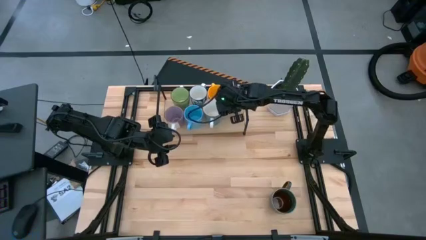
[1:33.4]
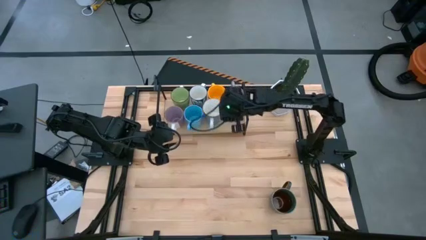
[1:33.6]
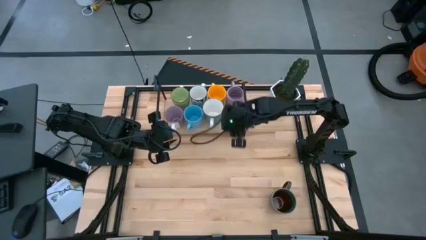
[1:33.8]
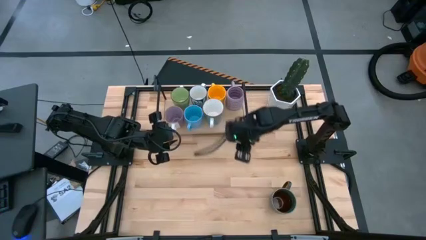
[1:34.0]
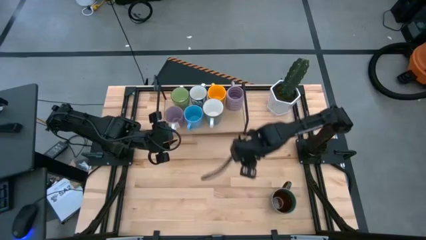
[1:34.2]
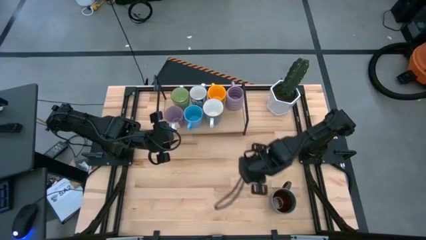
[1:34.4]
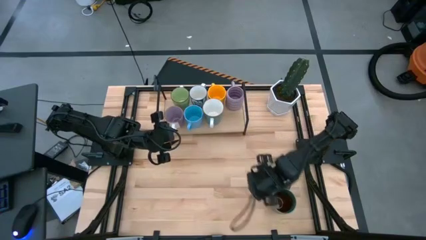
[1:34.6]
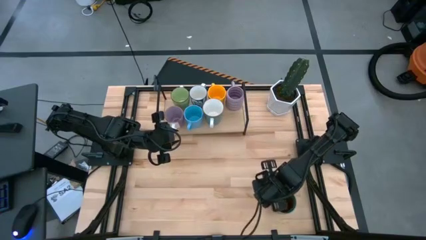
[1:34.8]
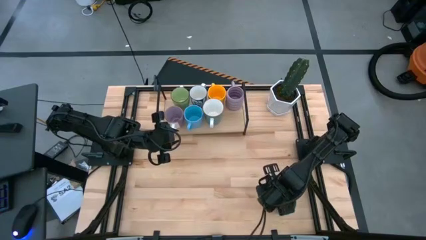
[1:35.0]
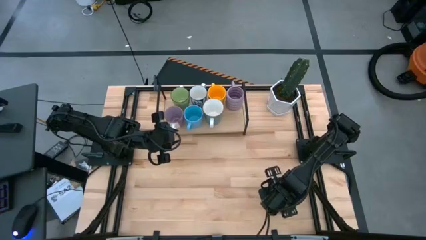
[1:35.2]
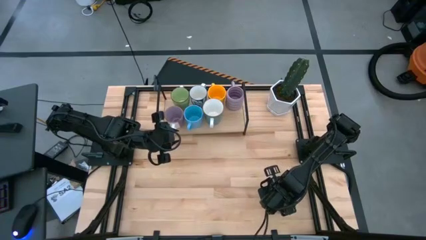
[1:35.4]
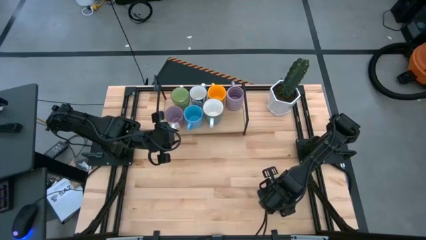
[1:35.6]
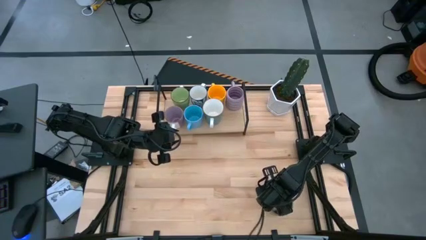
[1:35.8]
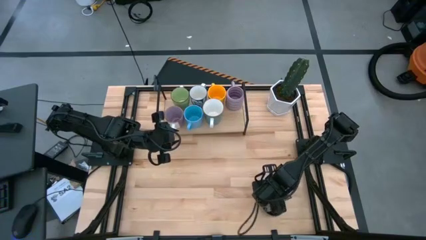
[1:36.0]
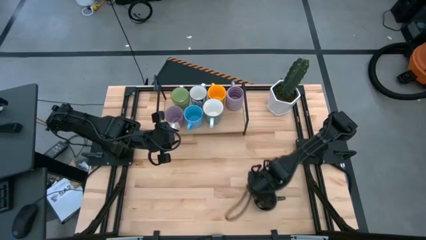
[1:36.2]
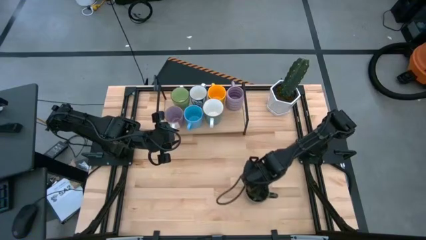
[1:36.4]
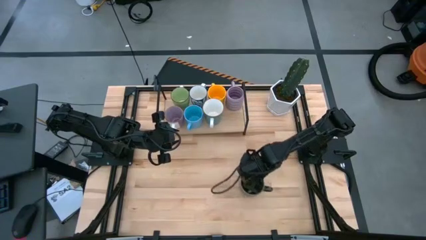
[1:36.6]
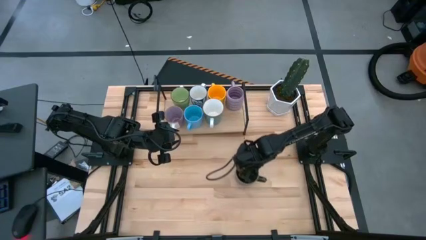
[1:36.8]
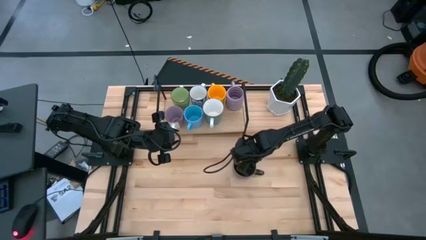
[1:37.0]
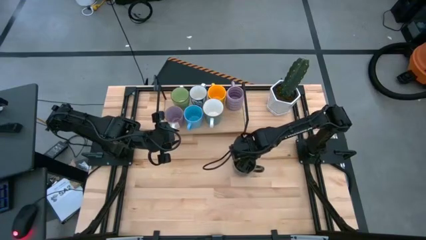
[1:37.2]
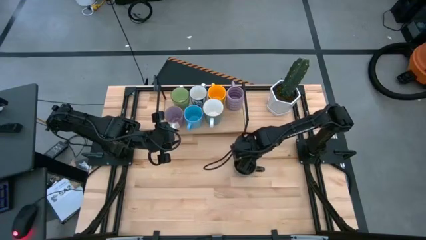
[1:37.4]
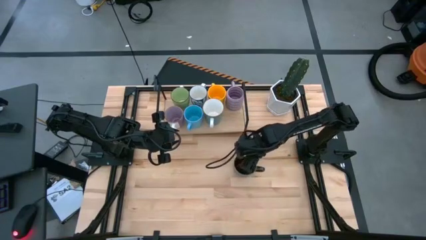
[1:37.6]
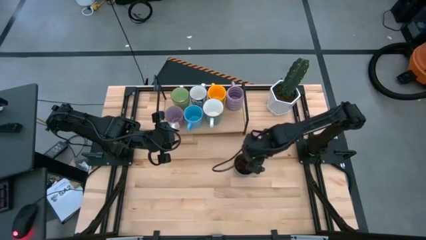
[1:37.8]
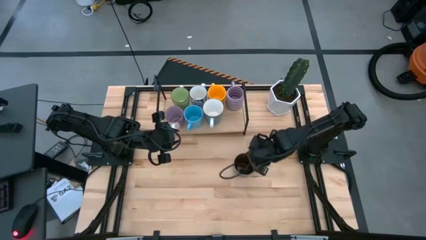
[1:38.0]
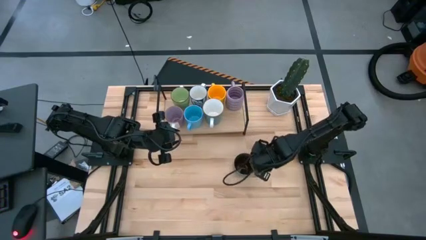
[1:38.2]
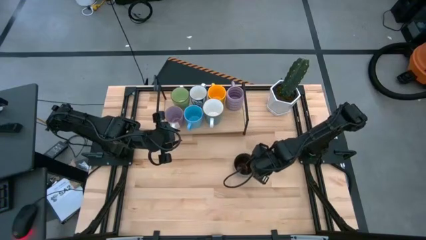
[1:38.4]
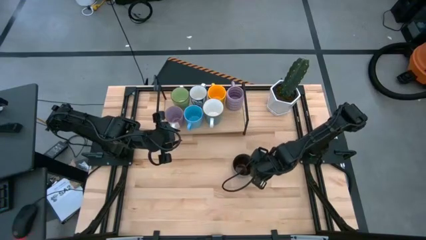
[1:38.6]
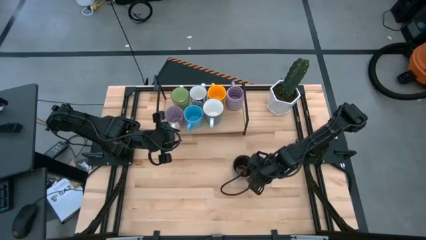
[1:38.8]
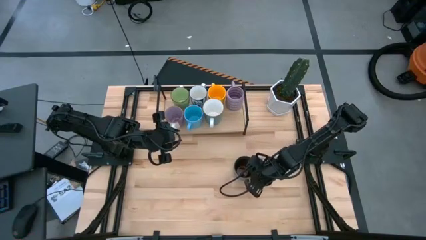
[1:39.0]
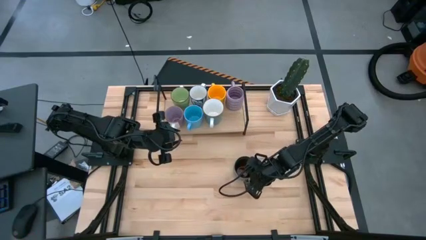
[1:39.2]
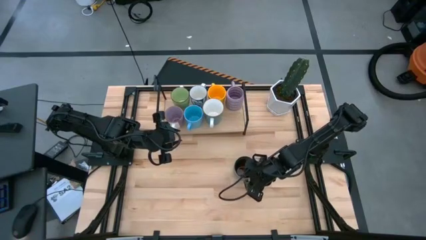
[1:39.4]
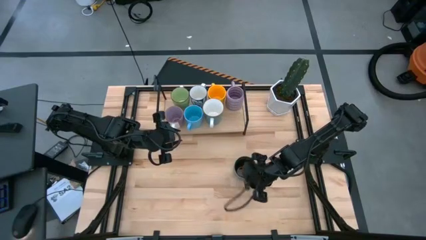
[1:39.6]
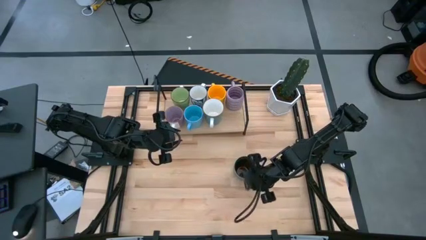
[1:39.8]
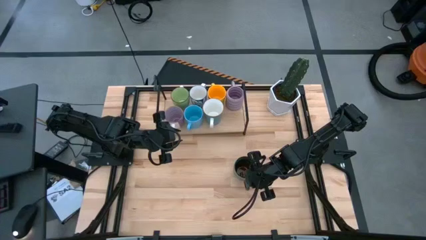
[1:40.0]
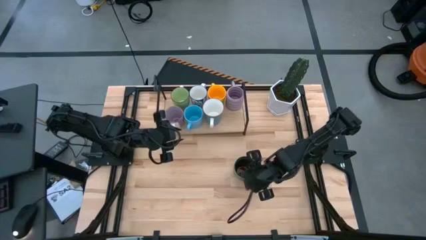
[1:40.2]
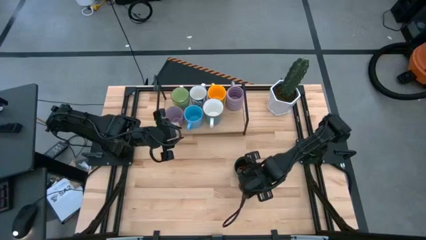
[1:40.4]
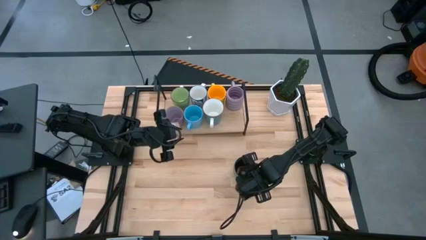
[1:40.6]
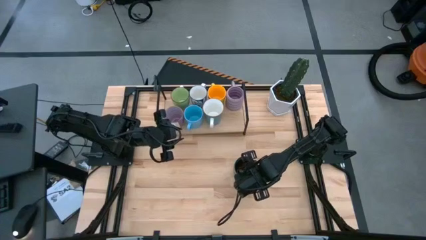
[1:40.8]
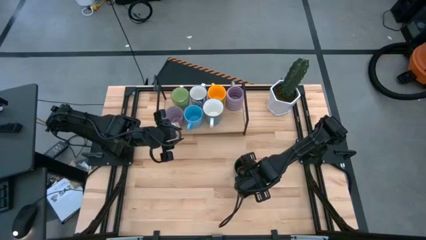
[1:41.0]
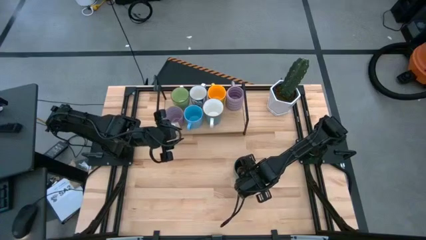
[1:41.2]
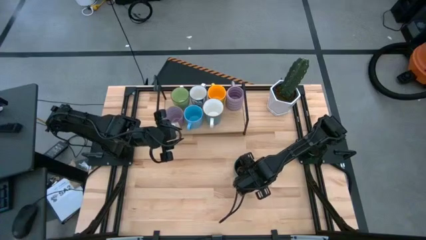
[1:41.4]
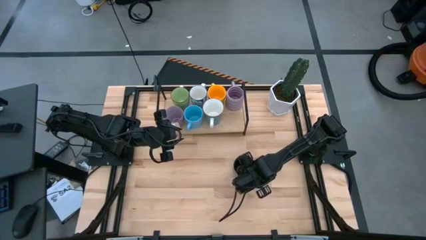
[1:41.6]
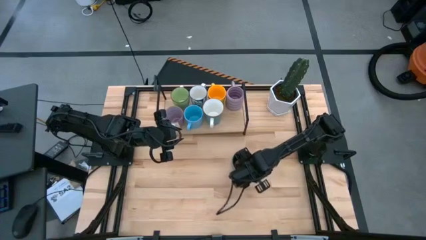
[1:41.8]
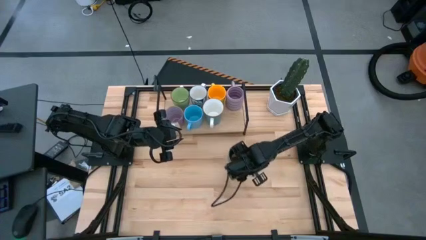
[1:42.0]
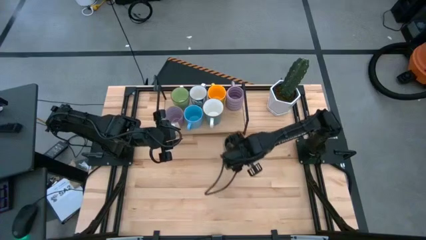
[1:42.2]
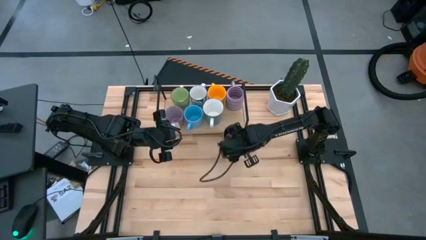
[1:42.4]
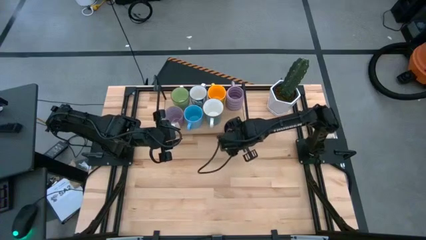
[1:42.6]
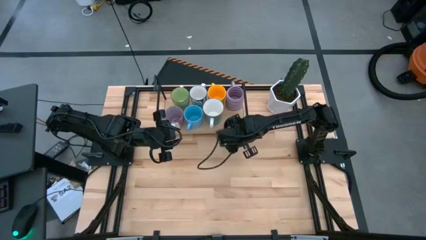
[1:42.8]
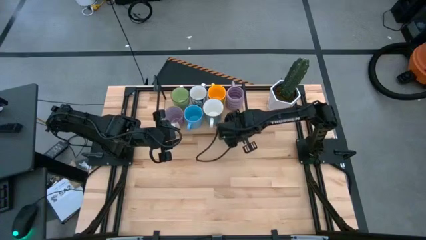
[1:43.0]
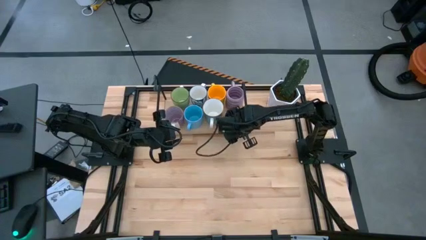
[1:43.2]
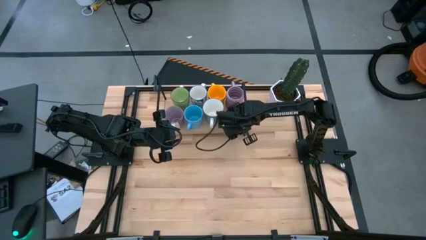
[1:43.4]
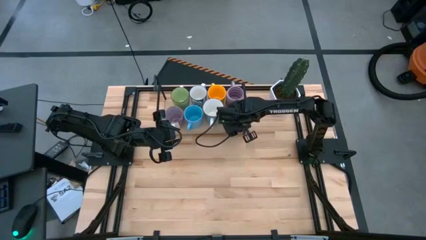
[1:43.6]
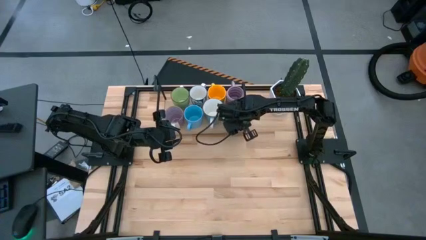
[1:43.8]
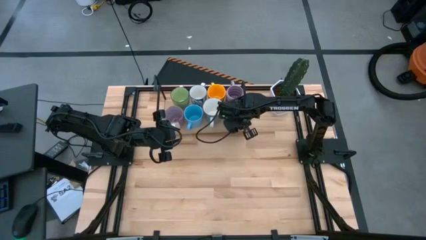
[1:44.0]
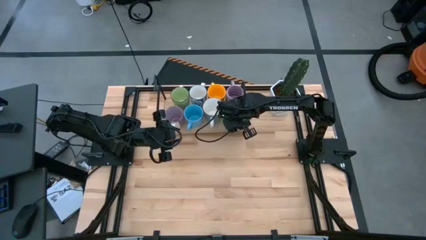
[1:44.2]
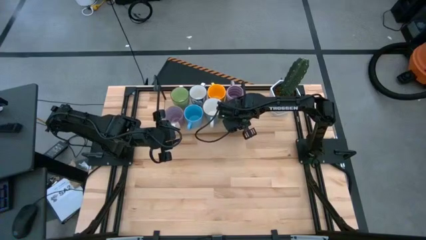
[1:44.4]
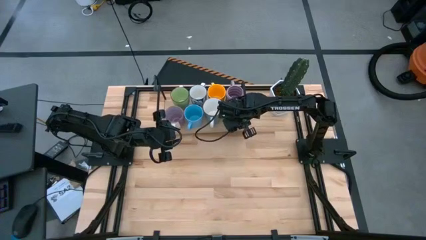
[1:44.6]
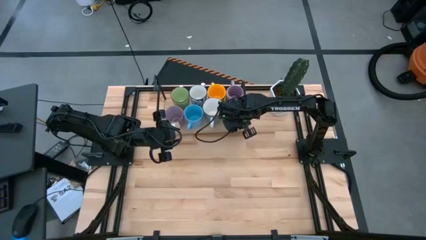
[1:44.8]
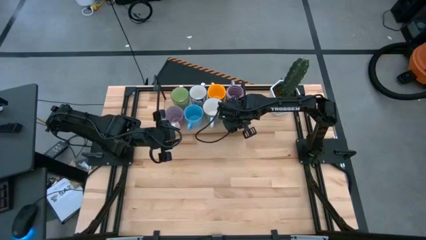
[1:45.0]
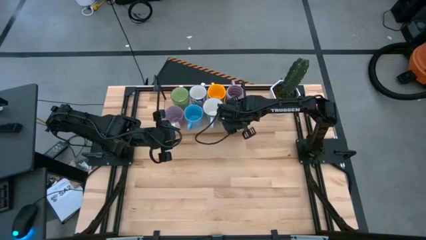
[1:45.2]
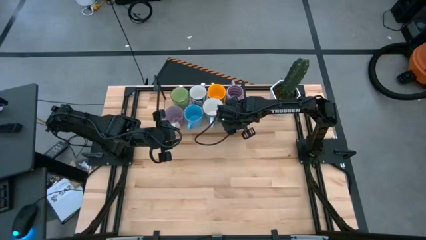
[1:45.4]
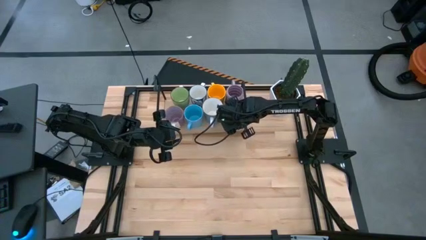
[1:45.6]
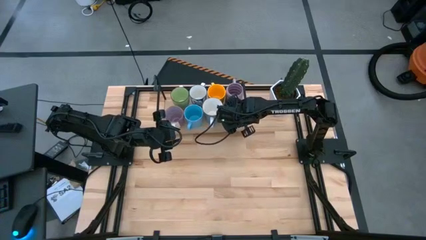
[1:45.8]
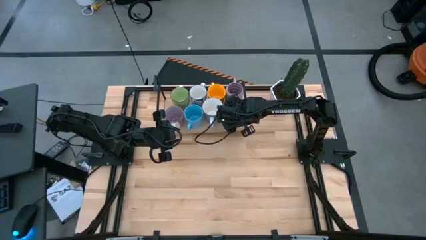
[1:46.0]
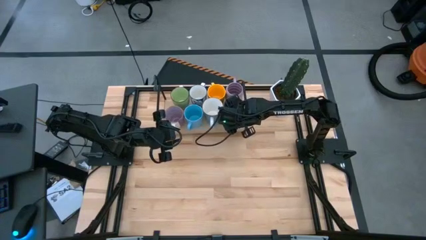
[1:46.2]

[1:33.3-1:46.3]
Task: Place coffee mugs
Put the dark blue mug on the shelf aligned with the purple mug

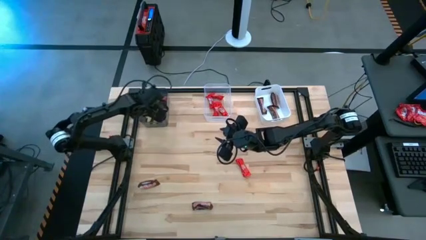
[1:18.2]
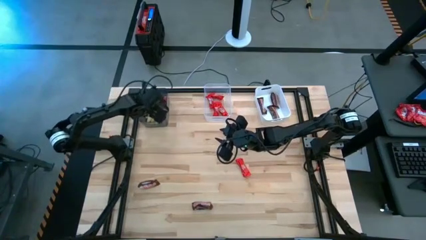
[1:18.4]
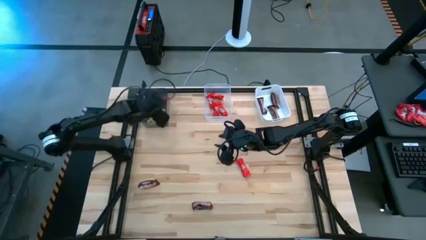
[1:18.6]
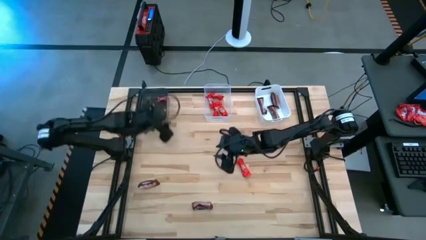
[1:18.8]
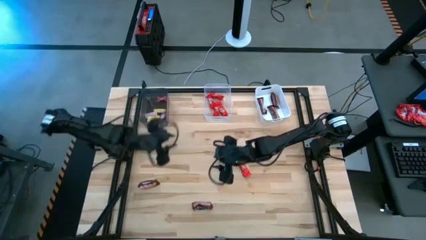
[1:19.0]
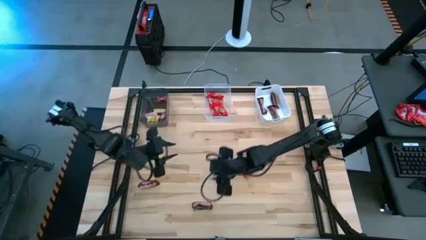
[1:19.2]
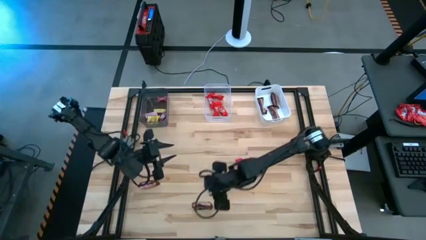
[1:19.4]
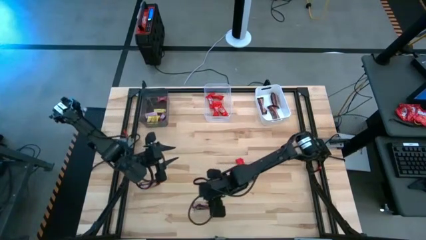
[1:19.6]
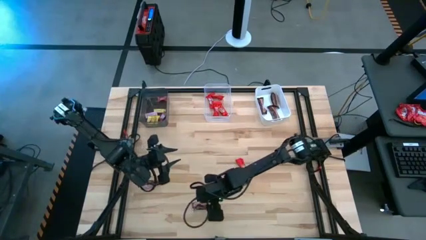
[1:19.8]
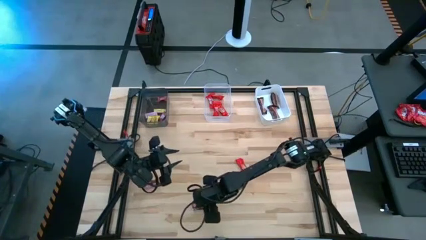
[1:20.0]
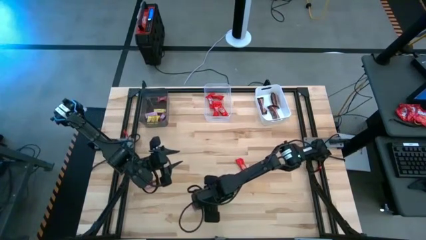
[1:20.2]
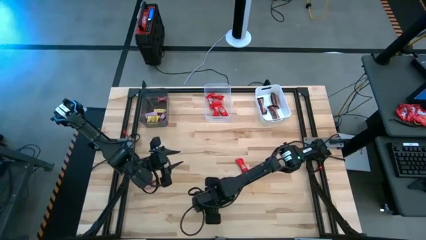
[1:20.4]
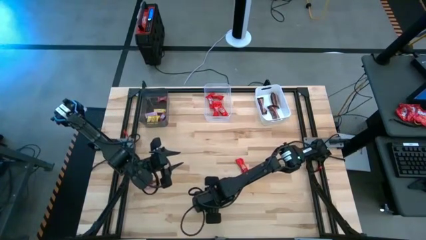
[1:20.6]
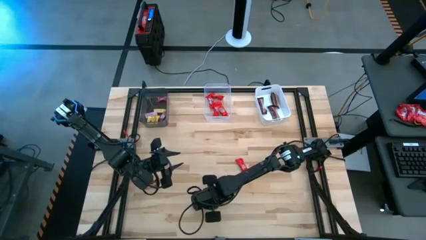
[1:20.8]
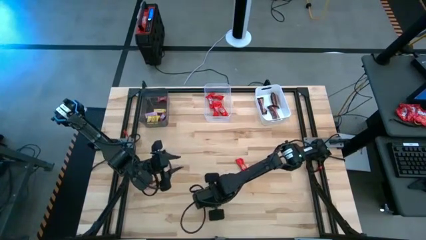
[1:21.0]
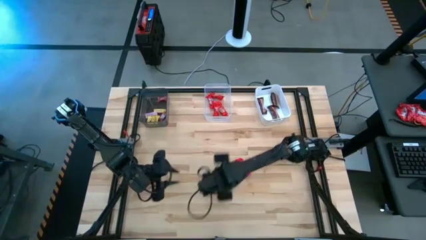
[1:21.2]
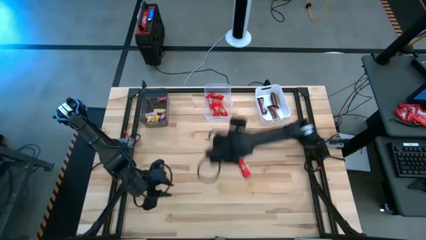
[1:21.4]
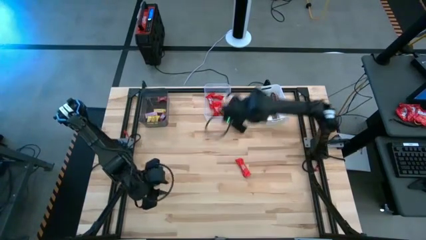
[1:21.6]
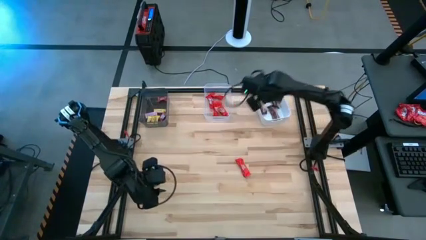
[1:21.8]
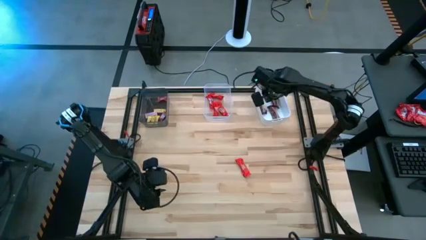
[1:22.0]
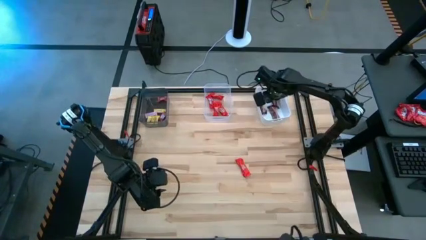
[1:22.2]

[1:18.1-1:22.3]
Task: Sort candy by brand, put in halloween buckets
Put the brown chocolate bar into the white bin
